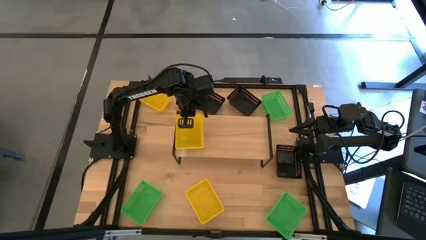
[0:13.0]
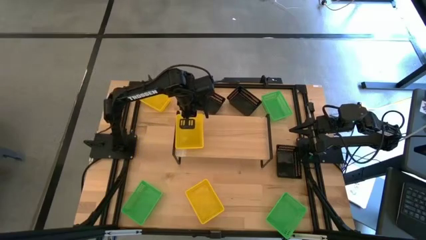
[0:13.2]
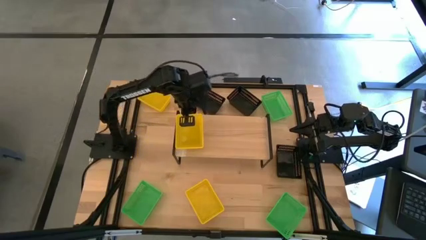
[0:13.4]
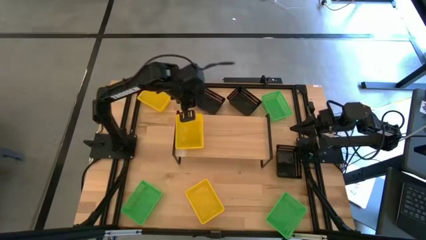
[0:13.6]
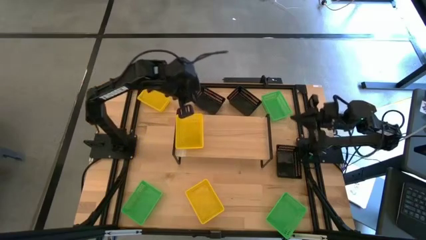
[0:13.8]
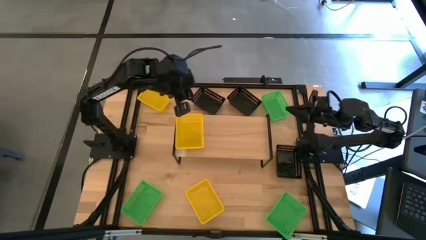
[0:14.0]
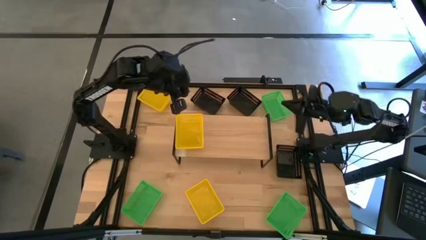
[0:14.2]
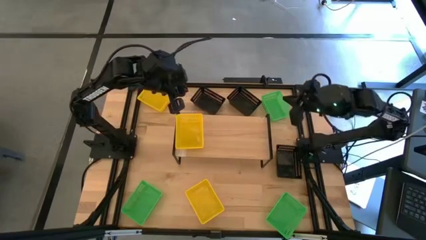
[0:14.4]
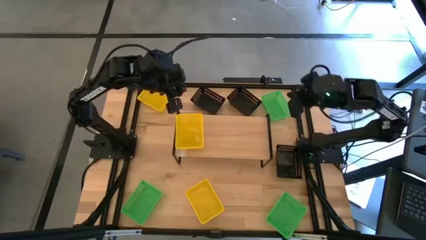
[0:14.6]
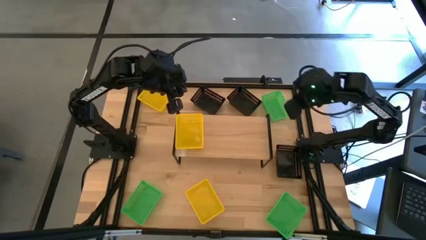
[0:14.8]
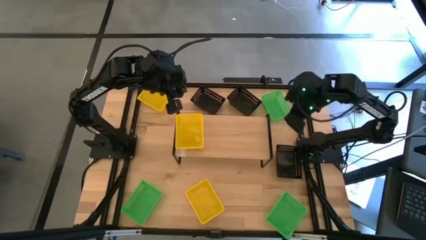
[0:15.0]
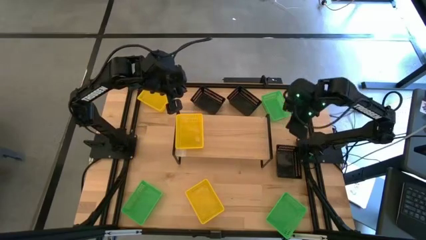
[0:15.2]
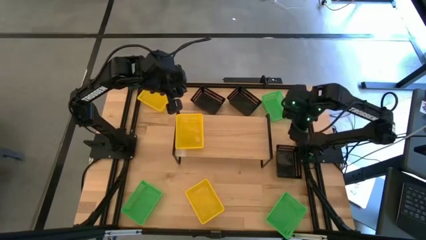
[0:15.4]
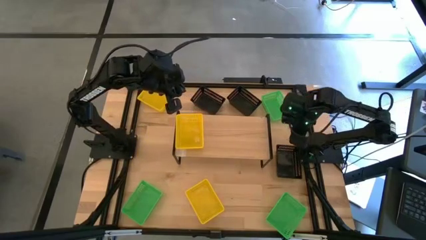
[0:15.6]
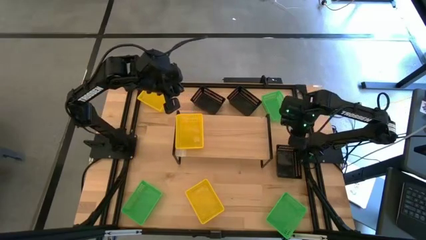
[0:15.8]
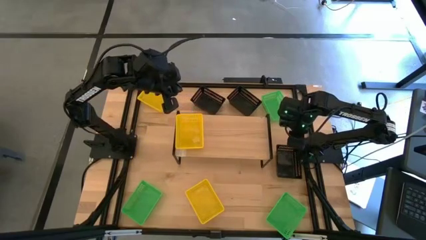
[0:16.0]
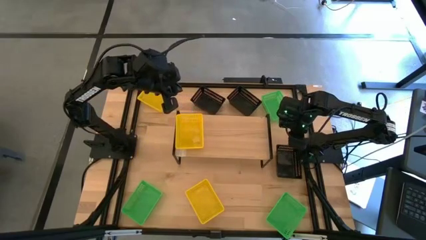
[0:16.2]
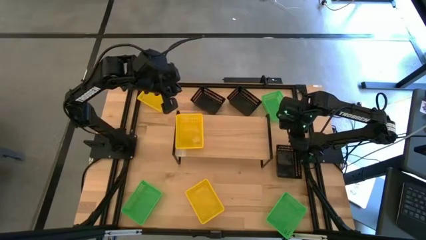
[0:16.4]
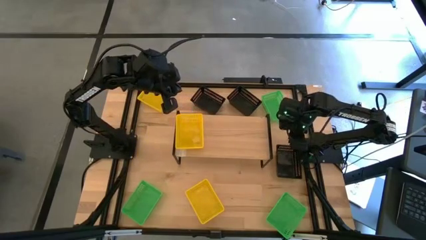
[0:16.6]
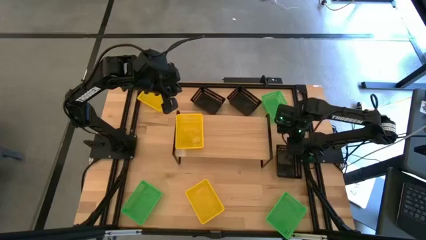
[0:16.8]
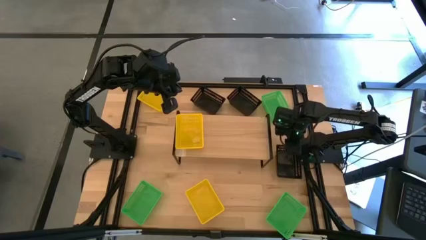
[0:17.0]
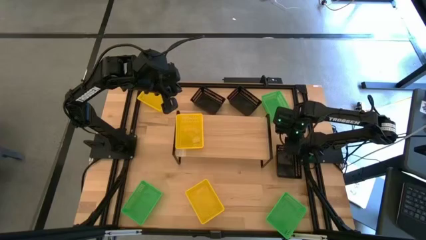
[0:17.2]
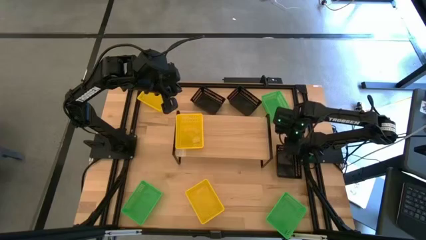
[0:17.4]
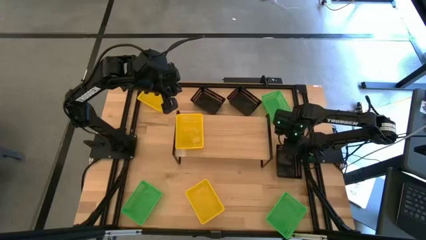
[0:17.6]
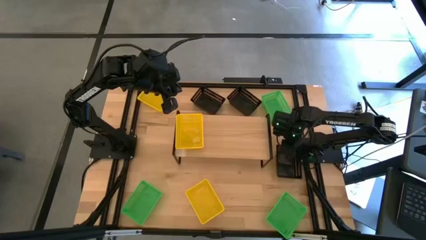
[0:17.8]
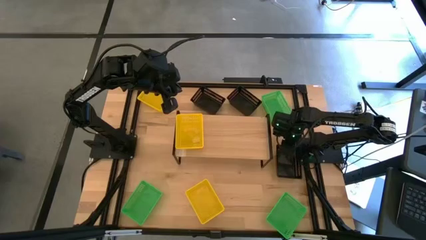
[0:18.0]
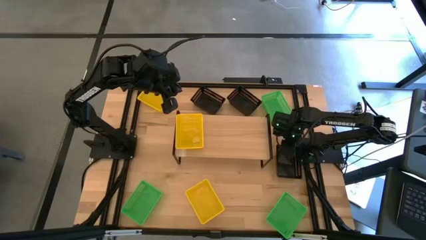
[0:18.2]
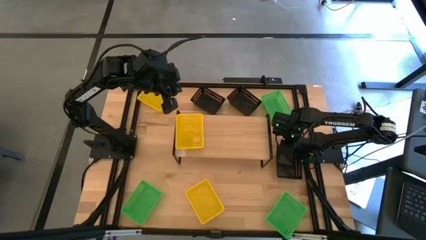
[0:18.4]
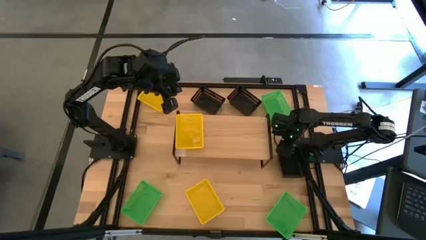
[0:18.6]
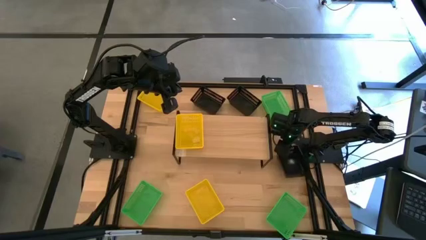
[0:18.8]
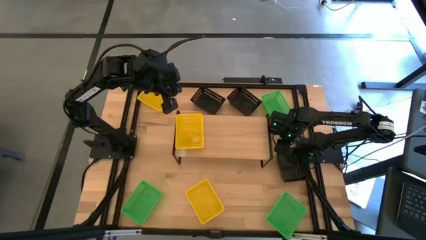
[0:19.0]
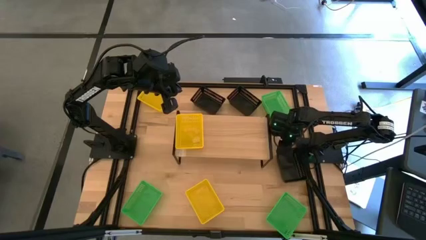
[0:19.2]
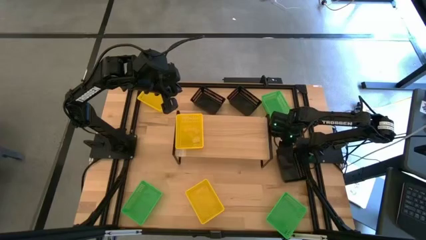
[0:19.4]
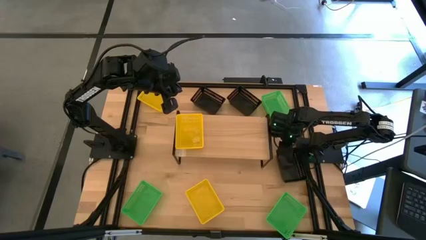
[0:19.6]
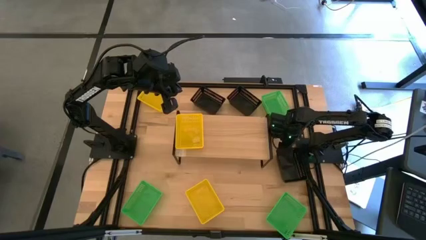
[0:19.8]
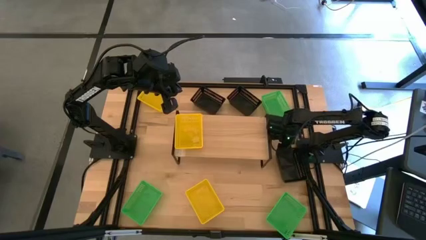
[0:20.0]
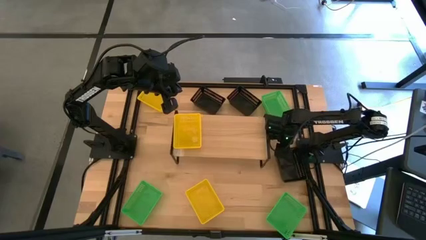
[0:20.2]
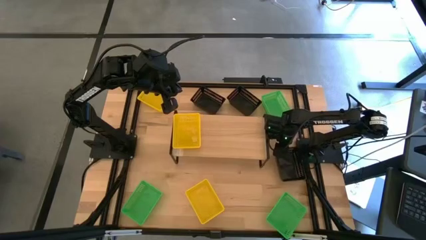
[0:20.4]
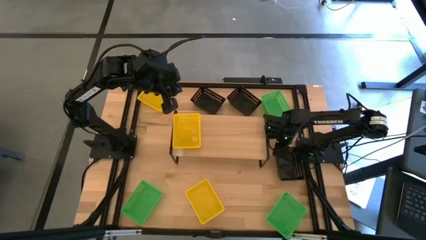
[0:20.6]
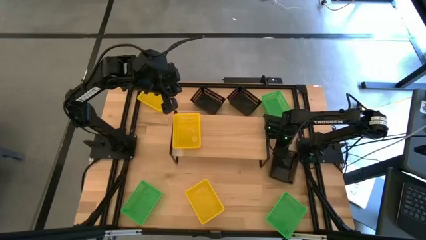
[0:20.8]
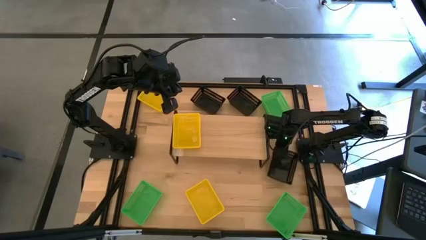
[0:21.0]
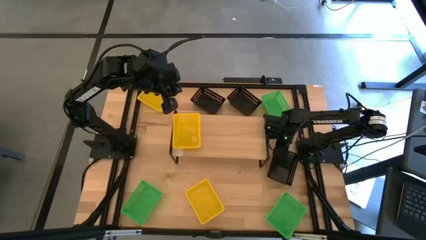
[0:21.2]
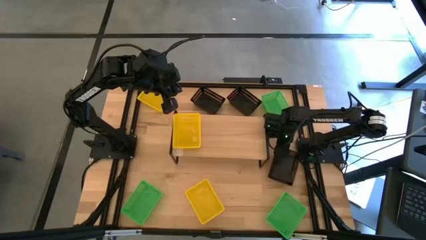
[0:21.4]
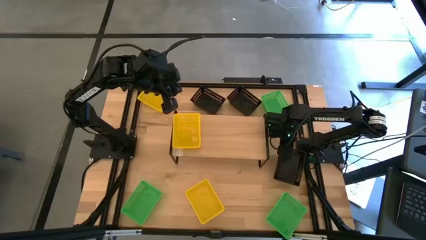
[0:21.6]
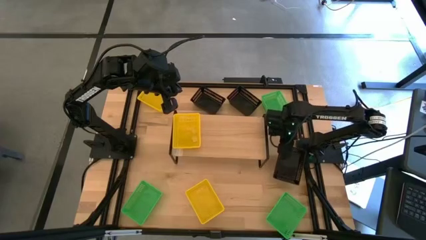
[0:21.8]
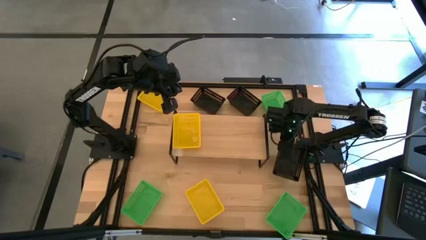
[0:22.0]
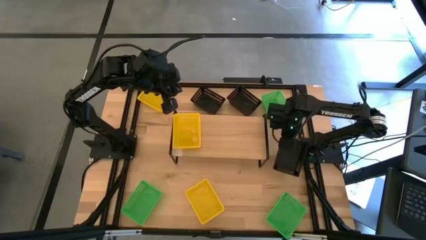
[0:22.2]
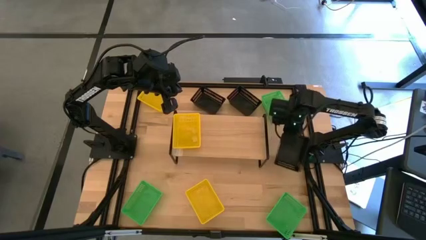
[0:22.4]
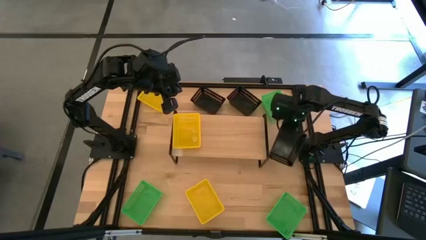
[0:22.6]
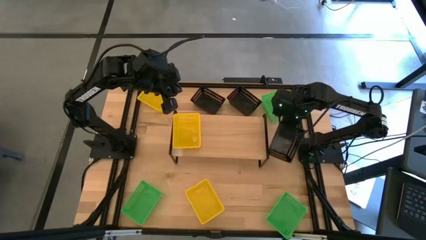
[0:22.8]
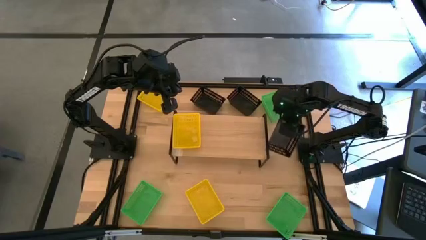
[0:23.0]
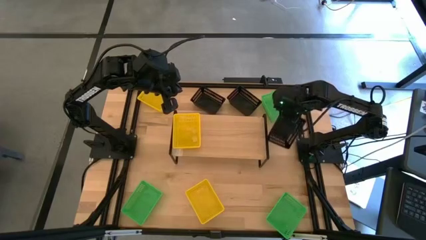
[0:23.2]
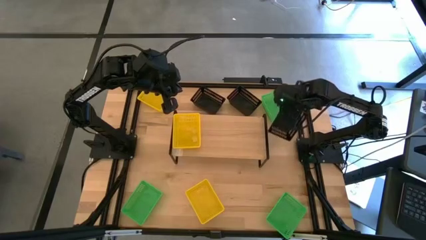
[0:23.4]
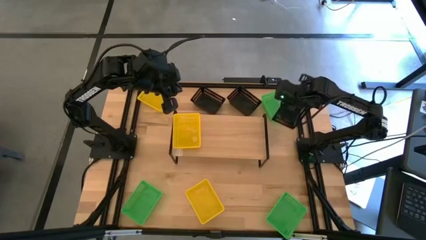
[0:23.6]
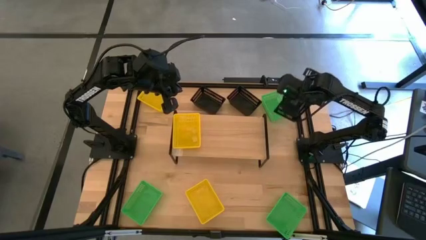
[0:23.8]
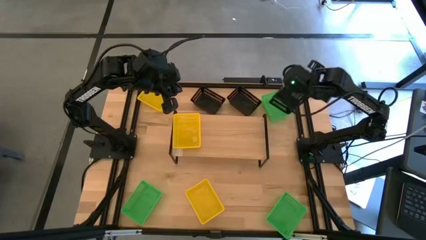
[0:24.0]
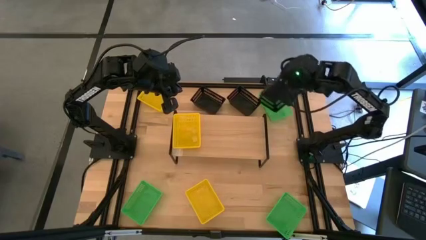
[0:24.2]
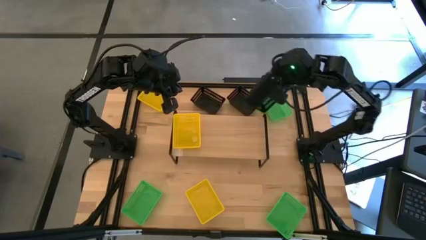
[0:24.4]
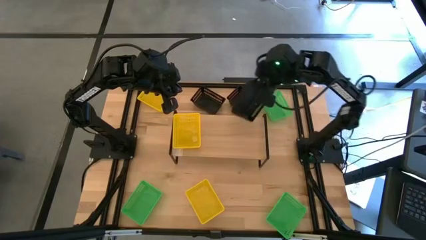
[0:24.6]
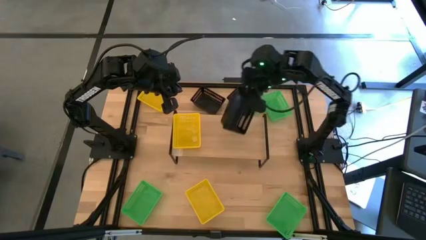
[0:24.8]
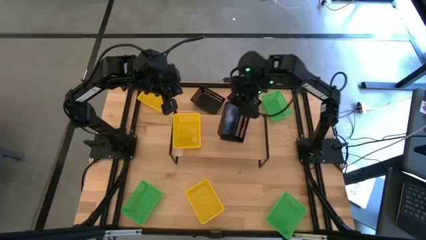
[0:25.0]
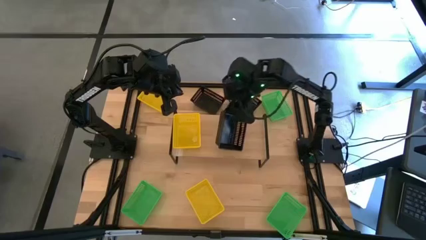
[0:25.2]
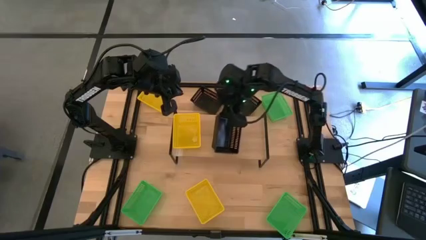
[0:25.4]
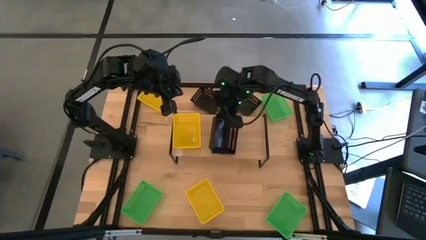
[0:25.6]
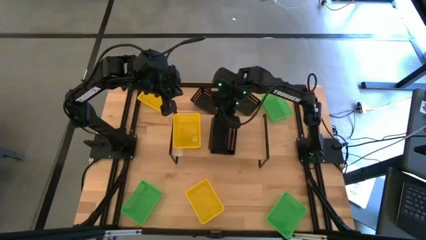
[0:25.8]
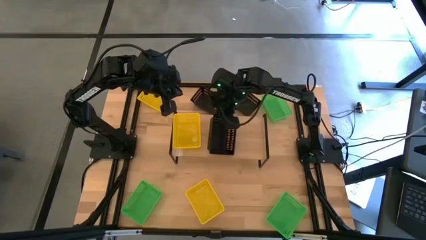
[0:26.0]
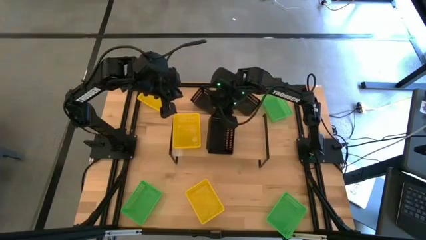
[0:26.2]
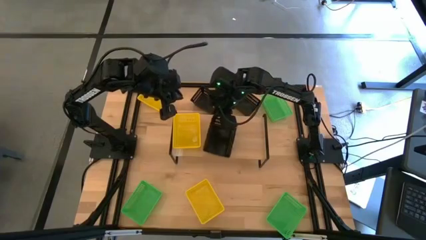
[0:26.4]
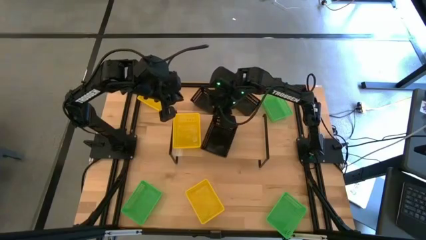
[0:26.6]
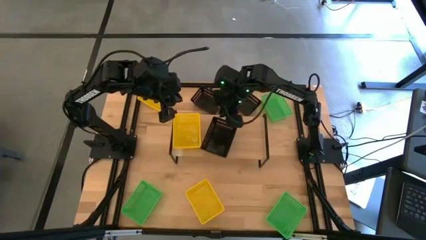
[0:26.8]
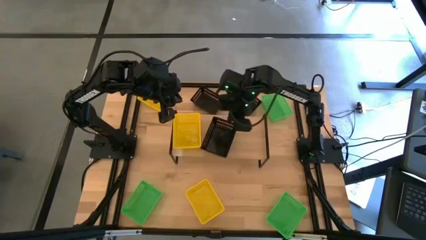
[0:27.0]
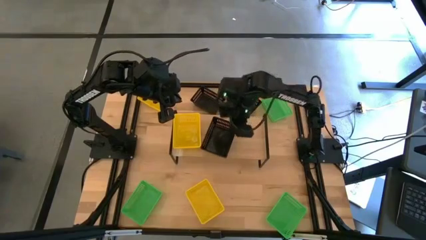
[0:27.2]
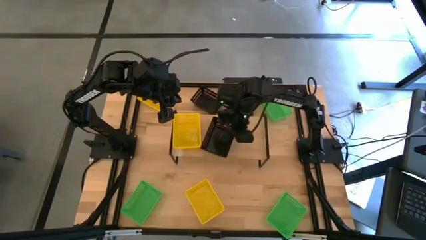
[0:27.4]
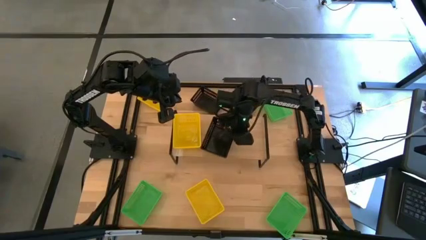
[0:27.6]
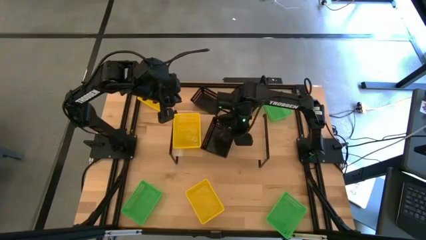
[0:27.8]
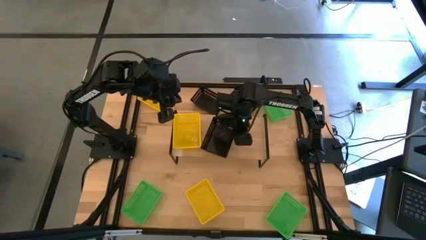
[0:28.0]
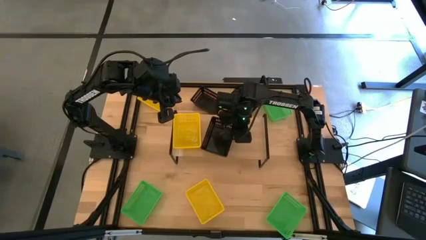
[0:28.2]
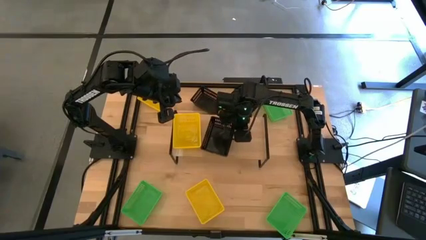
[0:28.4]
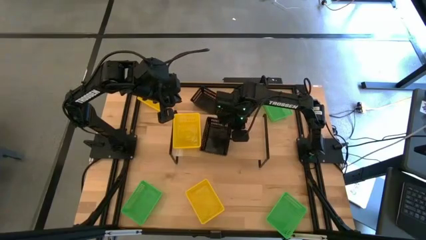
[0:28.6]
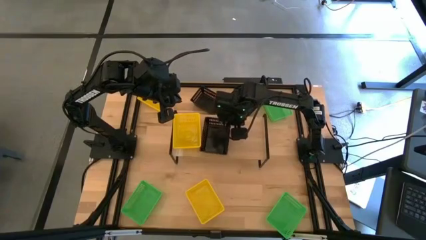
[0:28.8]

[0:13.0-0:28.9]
Task: Stack baskets on shelf by color
Put the bottom right black bin on the shelf
